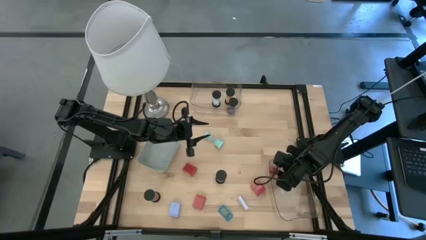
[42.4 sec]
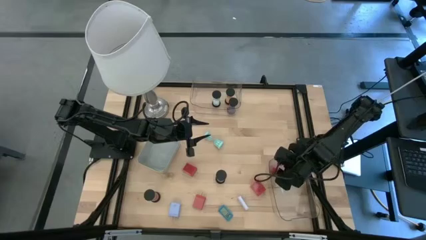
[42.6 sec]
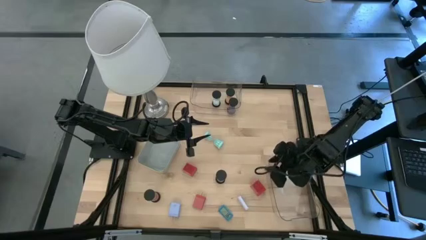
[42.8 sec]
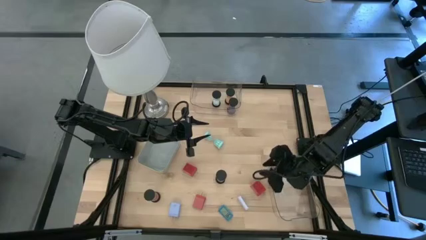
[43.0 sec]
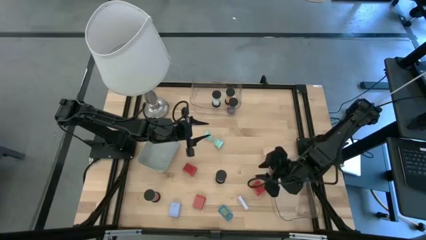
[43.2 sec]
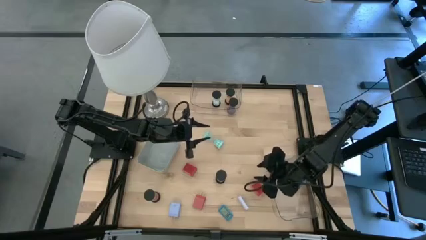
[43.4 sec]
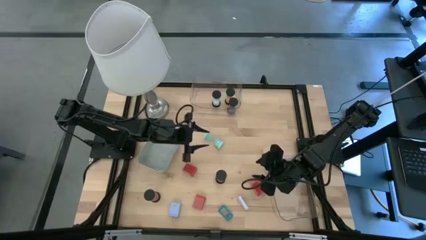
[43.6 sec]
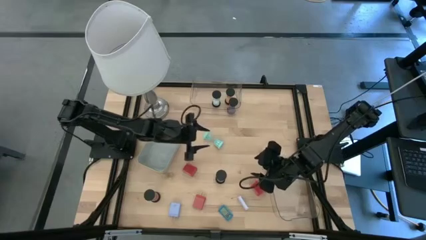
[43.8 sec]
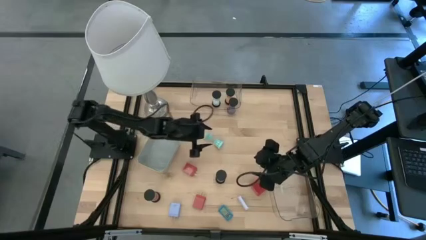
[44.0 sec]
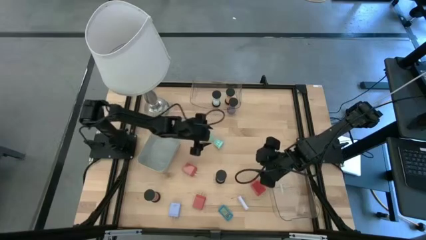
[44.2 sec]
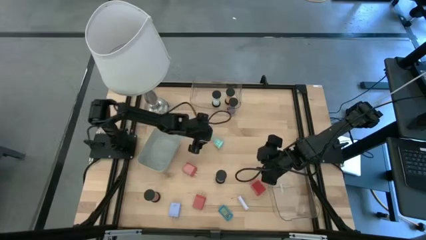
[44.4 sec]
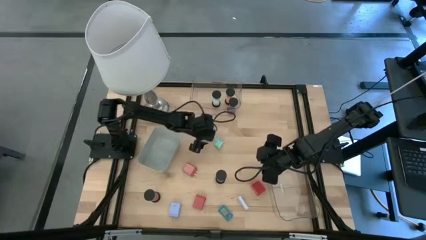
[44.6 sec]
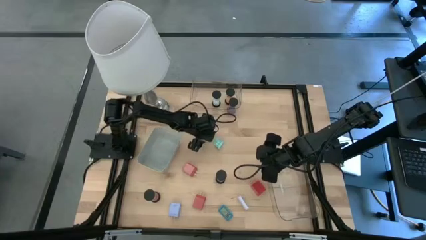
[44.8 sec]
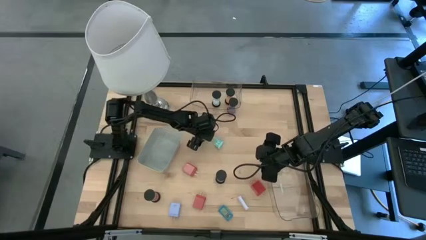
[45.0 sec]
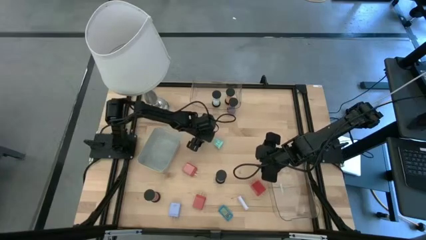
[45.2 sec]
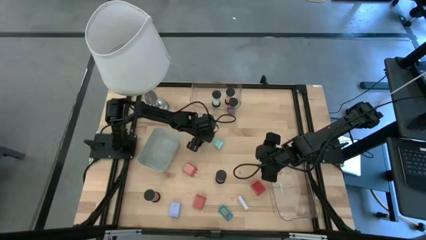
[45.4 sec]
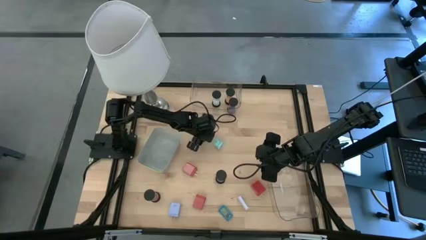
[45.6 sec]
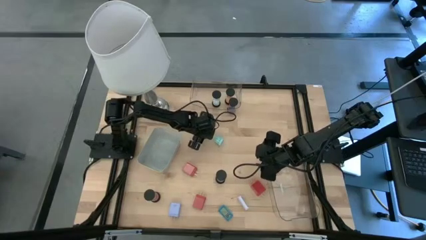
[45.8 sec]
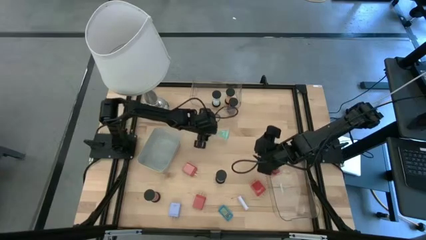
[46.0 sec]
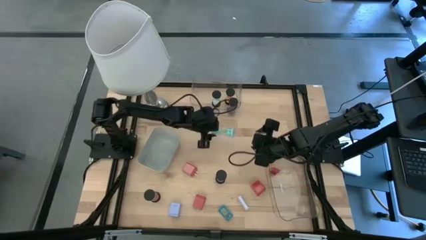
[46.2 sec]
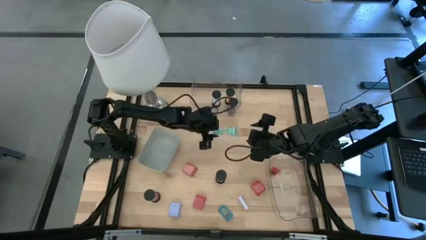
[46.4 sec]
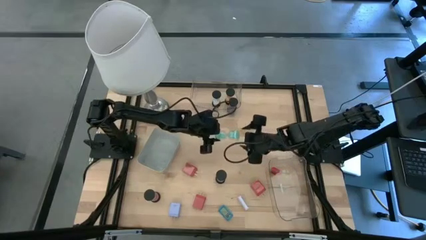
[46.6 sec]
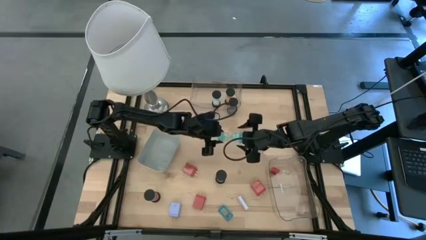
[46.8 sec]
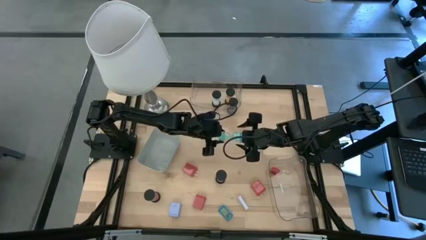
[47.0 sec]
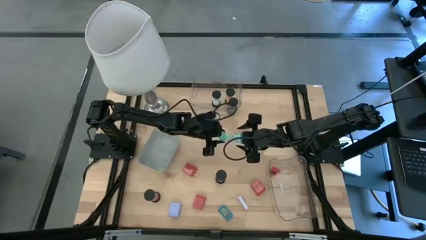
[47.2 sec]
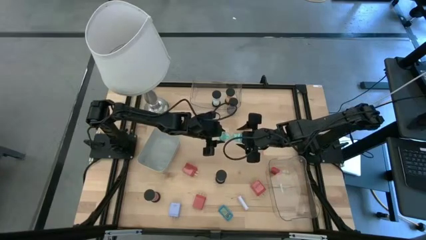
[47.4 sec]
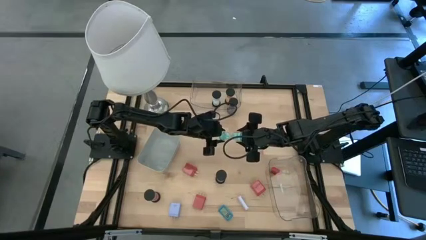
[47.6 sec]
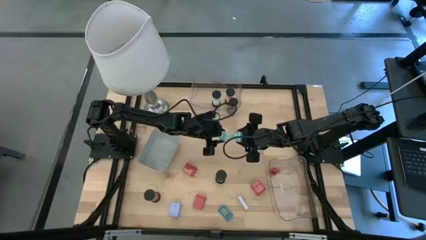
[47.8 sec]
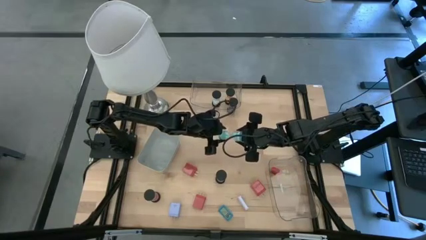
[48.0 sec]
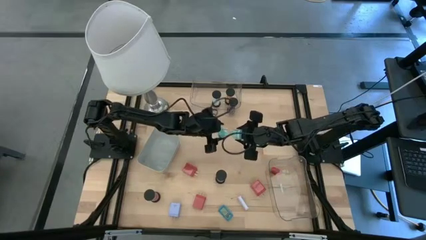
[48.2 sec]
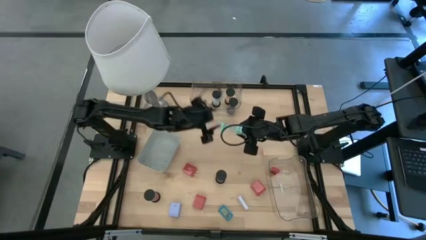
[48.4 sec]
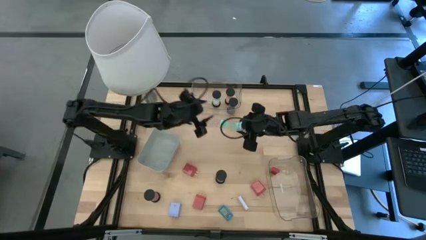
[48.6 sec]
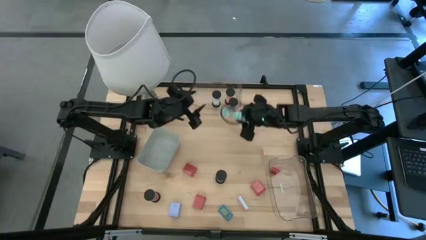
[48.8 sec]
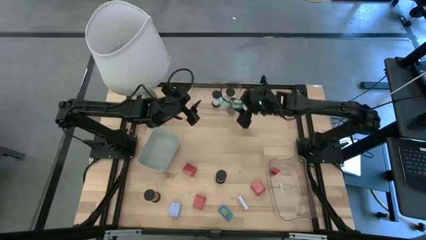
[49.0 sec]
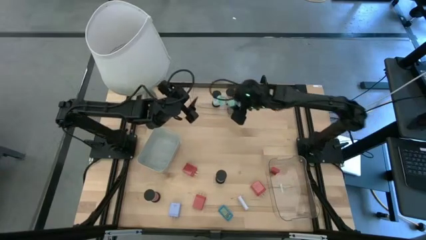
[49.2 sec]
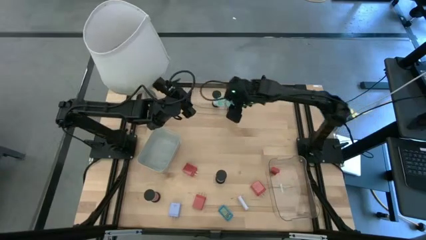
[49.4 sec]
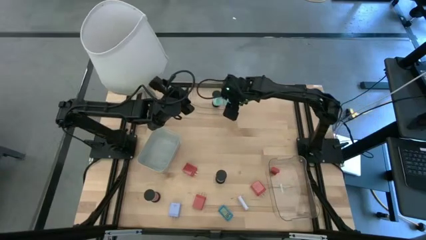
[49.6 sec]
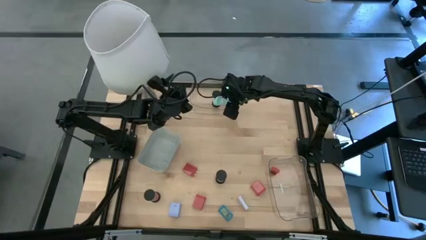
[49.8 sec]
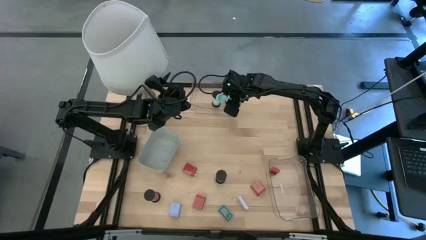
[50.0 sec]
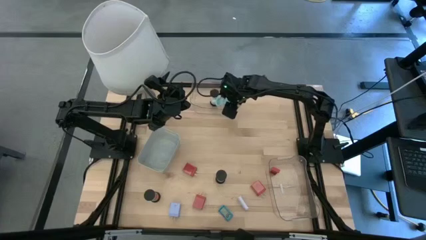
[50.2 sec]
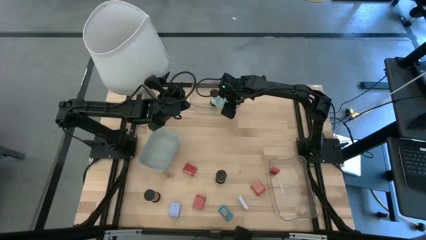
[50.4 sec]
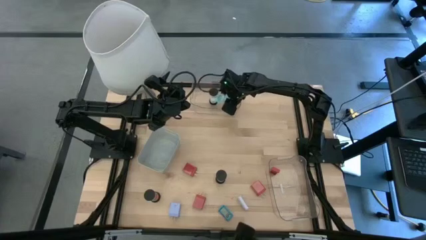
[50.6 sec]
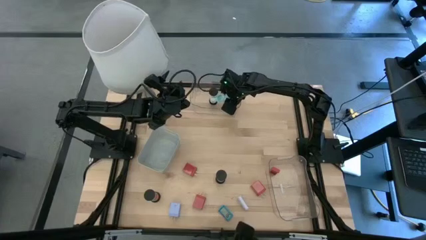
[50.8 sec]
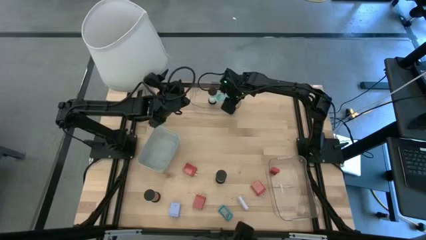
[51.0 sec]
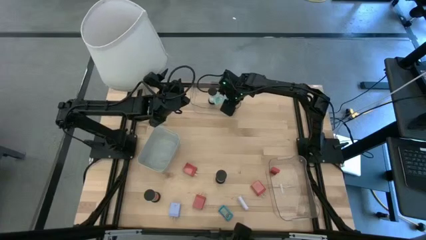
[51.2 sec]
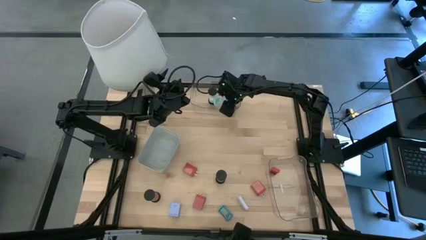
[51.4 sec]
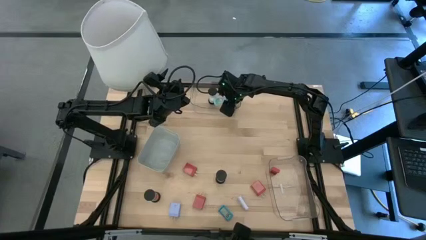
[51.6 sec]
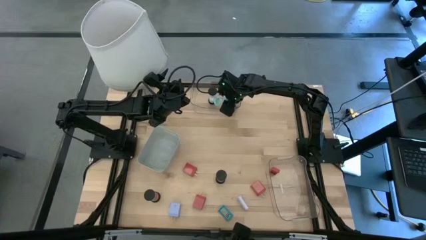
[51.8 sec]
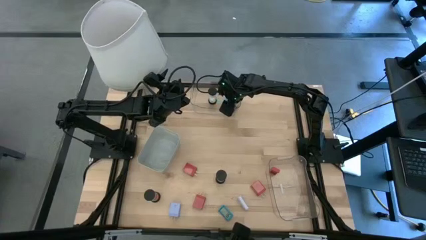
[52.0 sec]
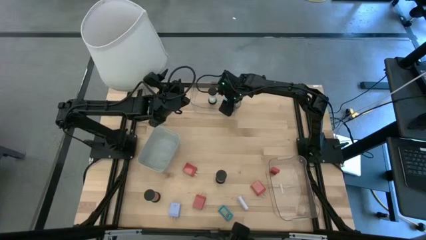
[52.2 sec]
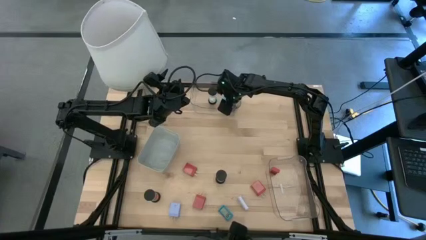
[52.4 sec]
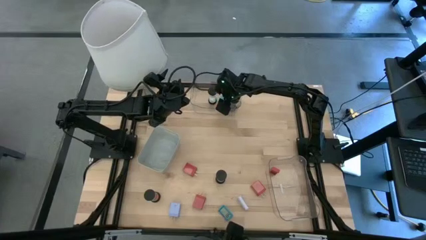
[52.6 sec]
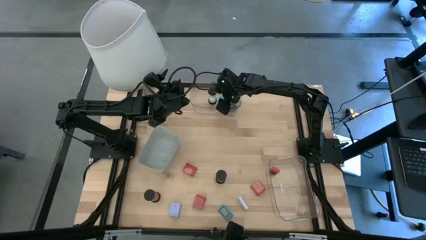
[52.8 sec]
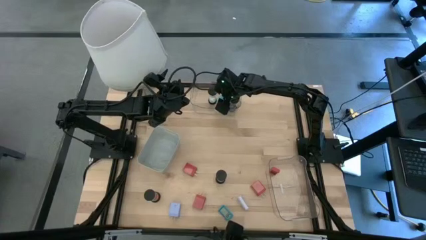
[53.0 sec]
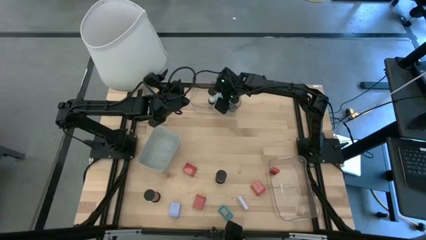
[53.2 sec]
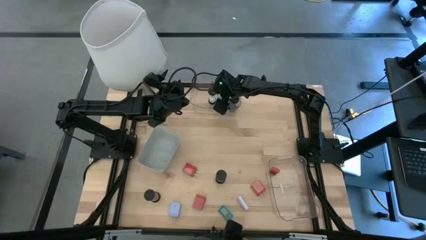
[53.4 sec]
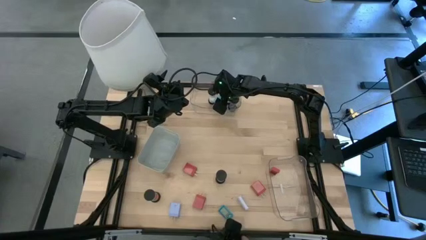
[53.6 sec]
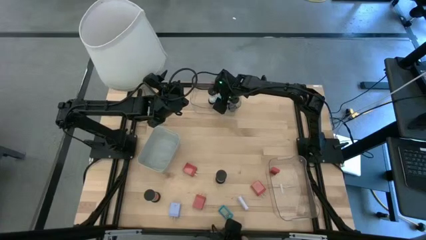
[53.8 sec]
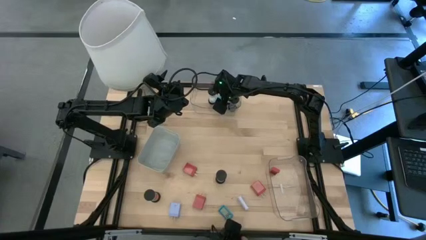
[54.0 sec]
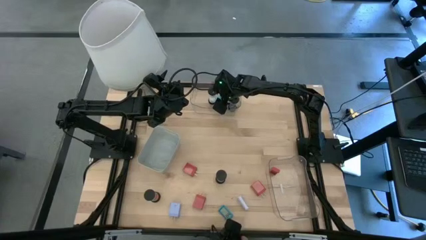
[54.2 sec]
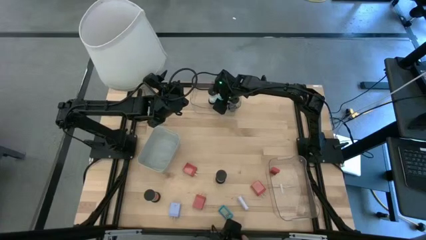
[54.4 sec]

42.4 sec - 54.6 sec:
Task: Pick & Place Office items
Put the green hourglass into the top transparent bin

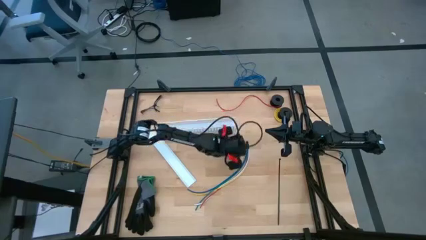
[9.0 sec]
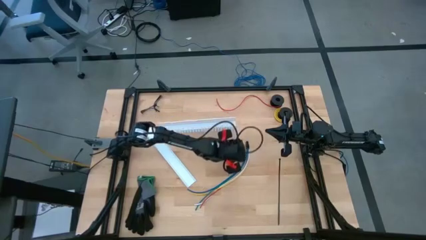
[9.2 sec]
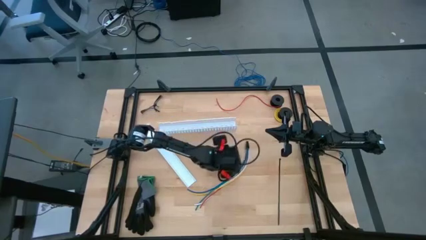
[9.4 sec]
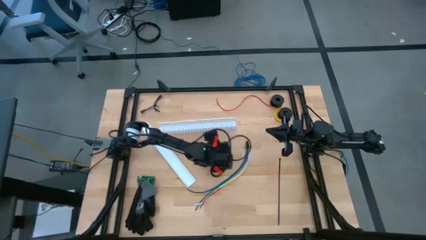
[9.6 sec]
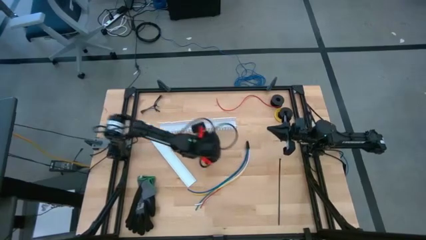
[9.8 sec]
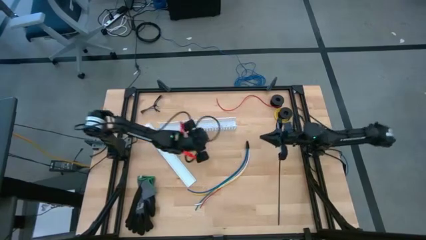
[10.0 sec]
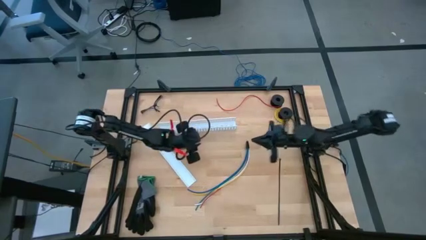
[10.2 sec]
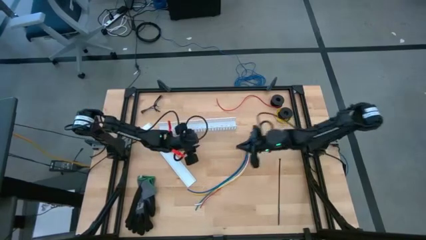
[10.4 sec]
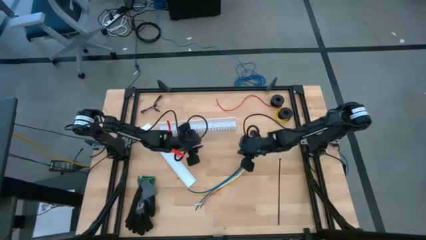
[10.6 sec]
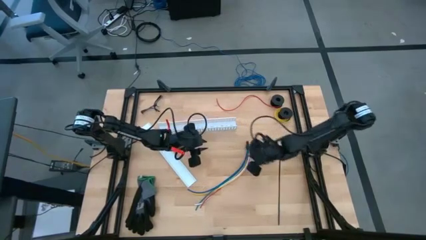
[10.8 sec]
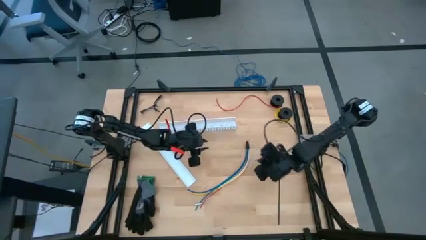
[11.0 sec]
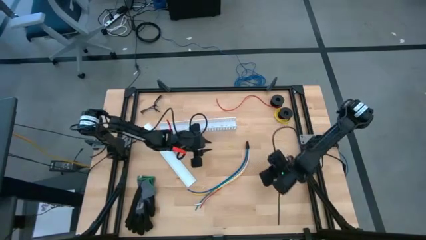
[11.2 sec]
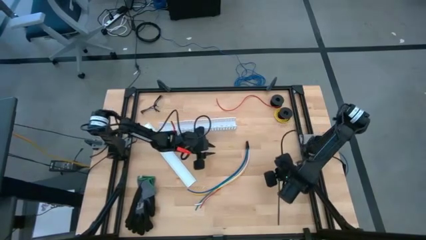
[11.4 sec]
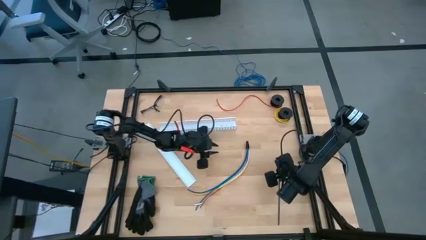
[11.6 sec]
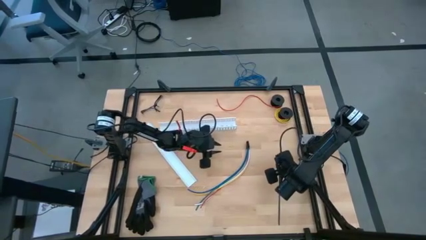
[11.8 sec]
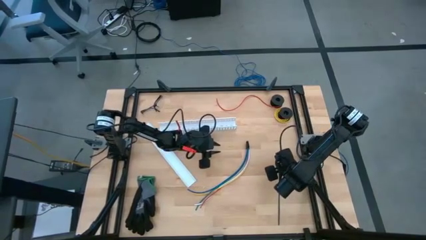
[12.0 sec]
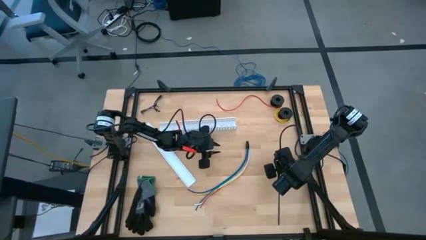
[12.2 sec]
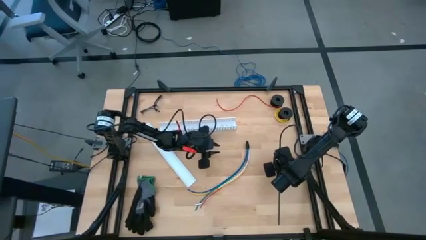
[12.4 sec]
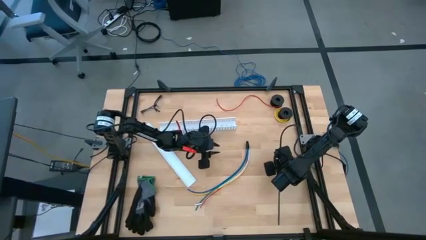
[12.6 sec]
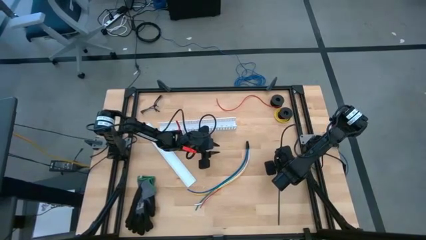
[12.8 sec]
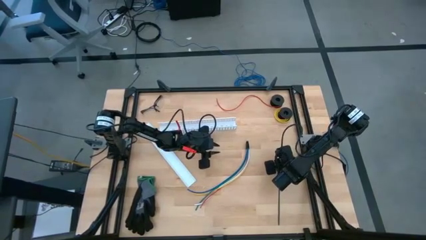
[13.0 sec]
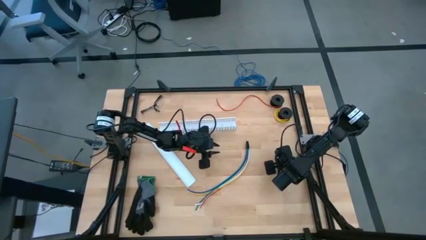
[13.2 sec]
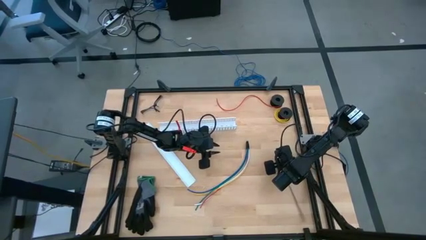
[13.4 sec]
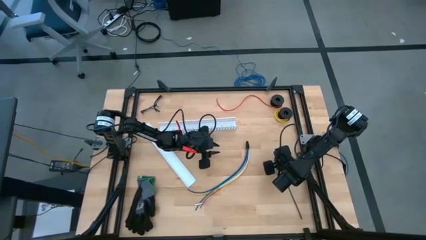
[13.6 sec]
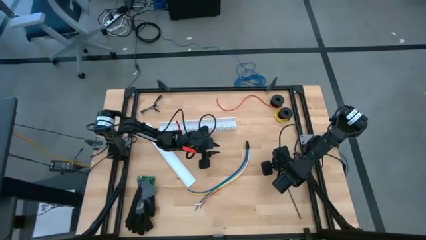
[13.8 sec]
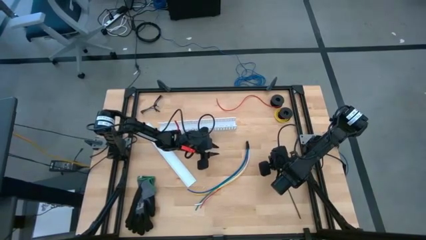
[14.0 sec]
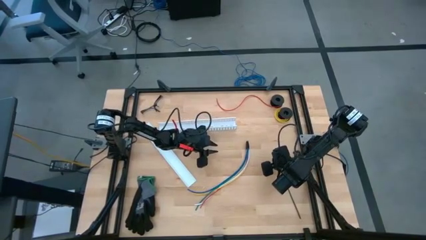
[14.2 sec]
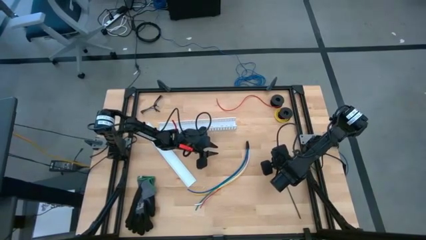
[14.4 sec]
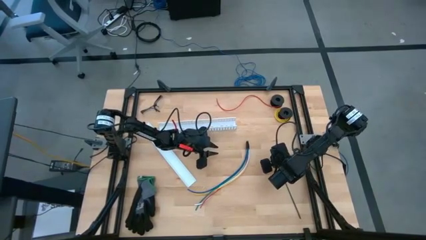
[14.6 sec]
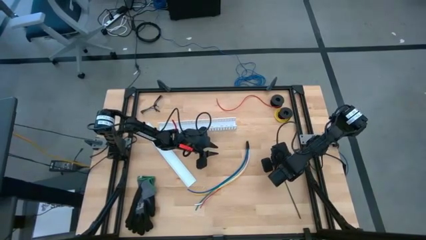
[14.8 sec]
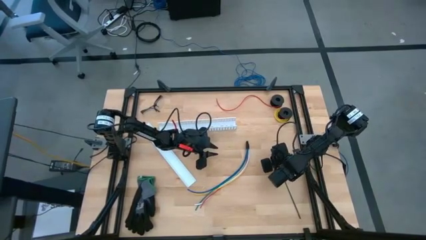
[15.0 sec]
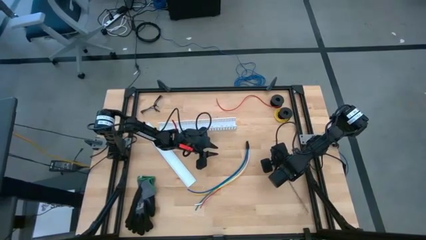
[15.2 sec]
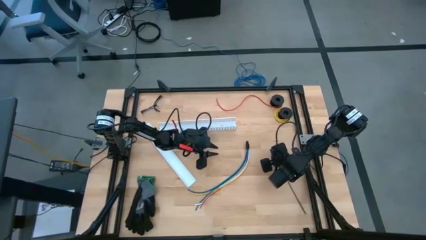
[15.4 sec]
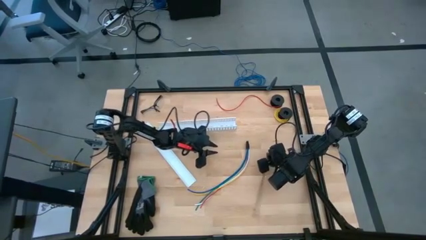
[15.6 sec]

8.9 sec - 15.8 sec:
Task: Ziptie cables
Prepare the black zip tie
